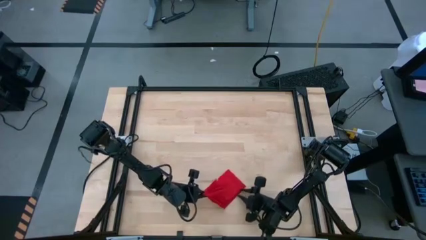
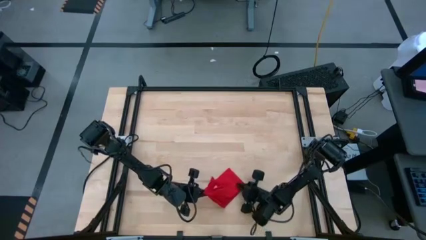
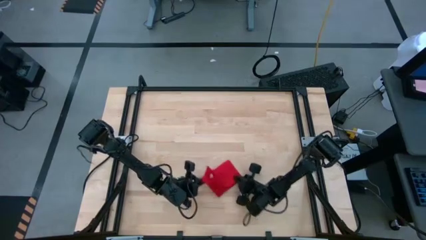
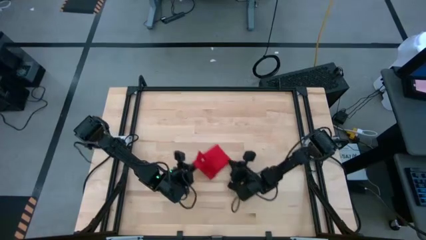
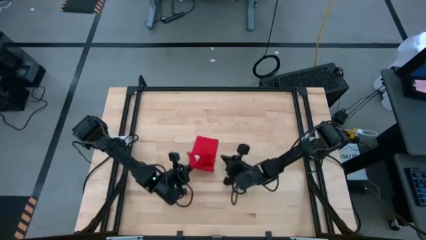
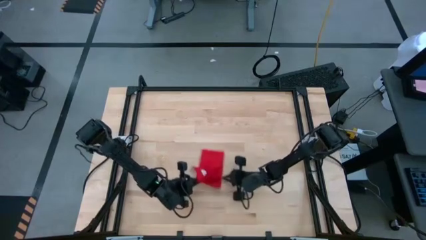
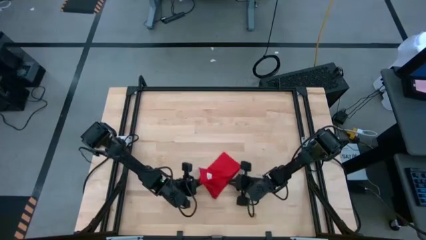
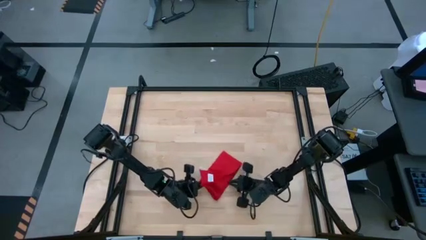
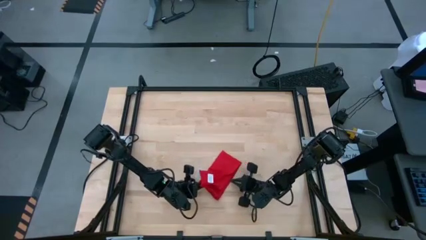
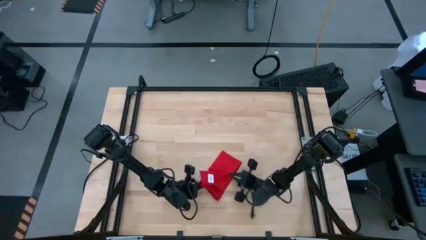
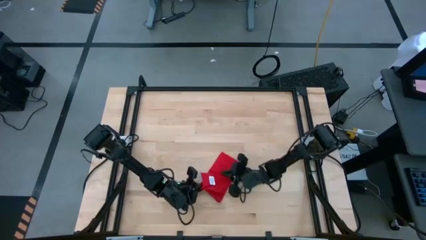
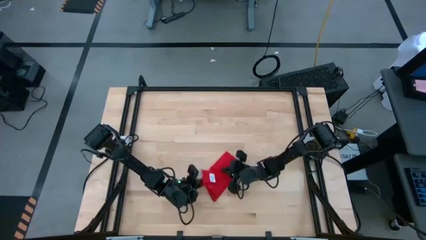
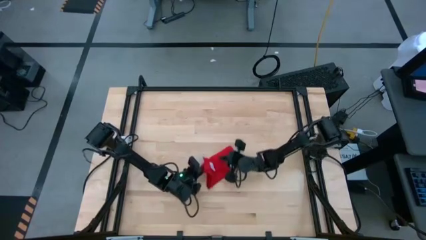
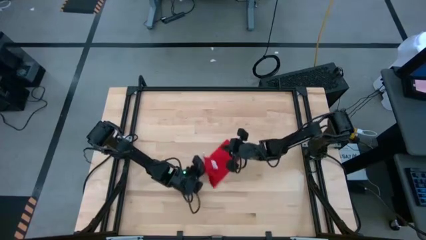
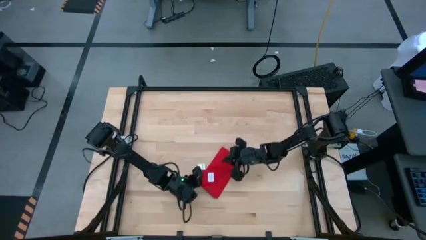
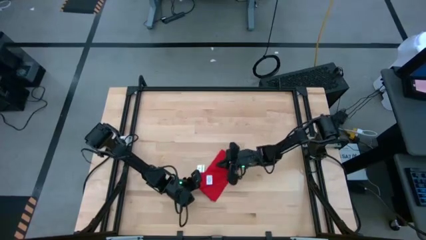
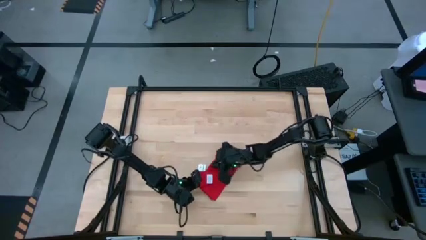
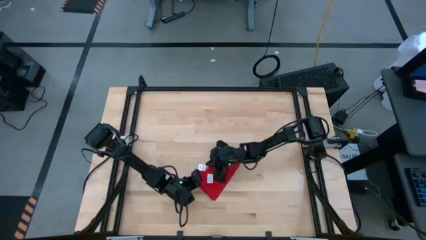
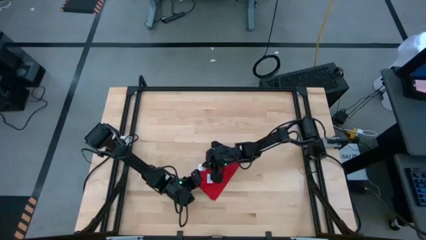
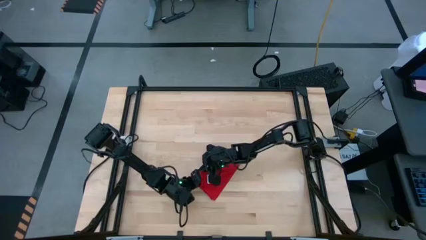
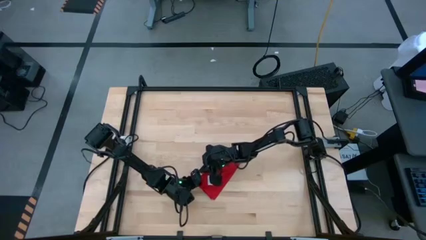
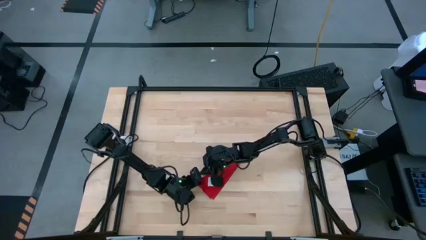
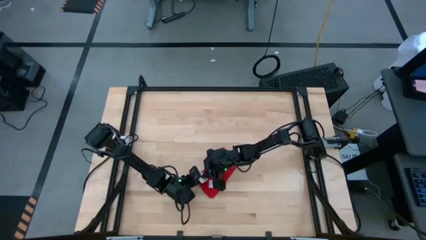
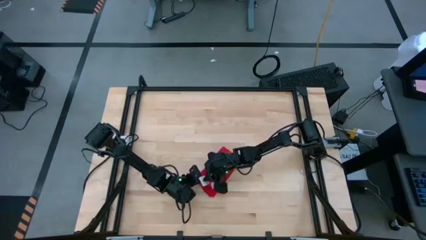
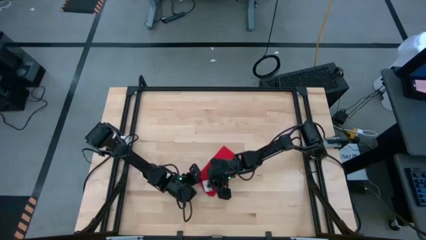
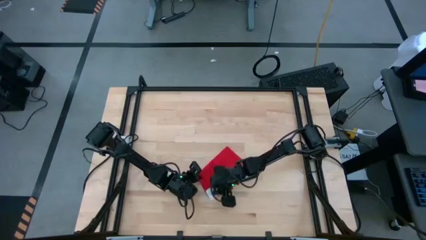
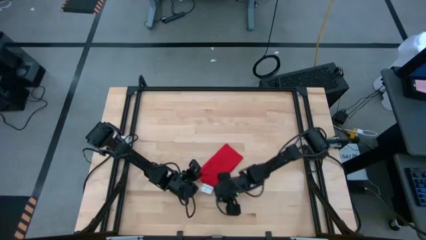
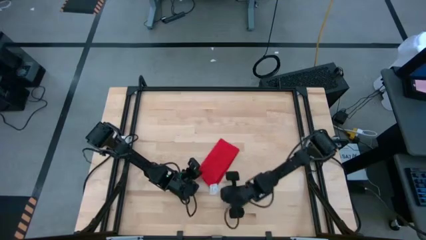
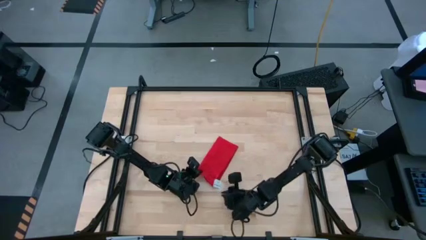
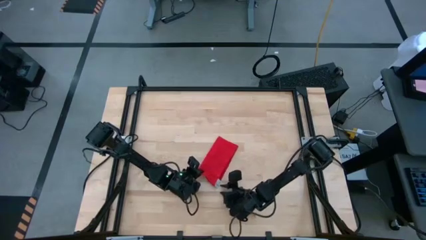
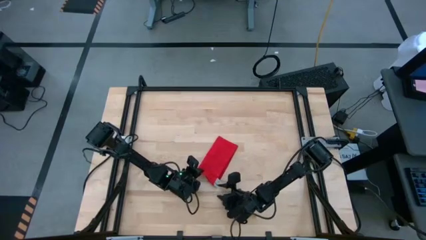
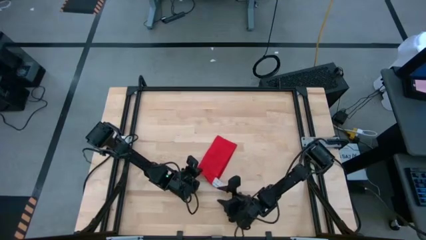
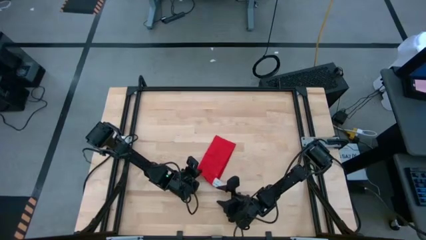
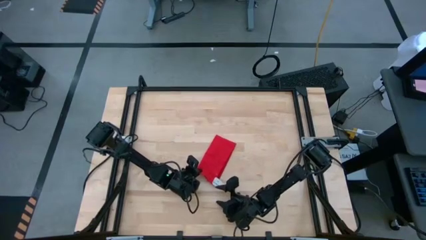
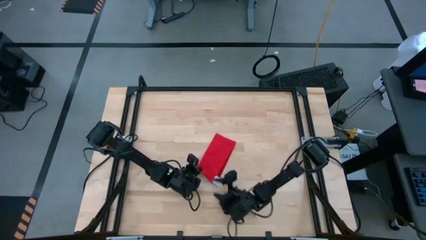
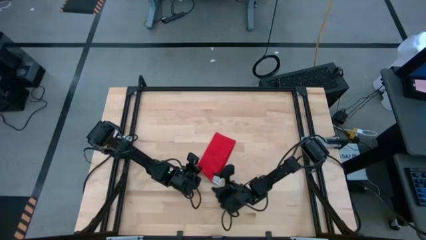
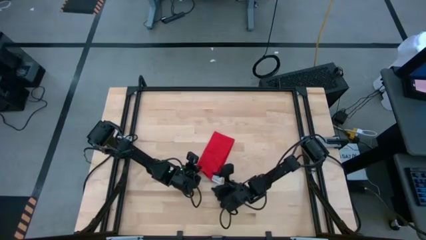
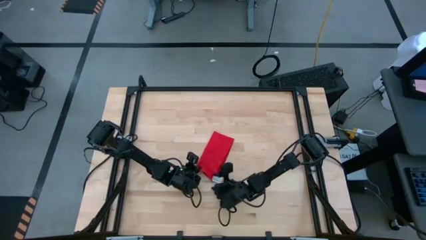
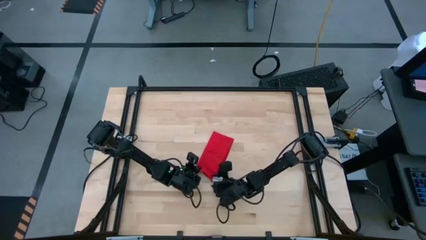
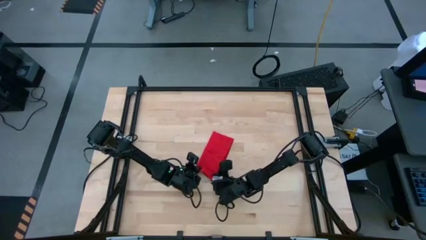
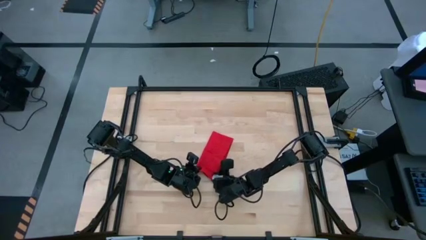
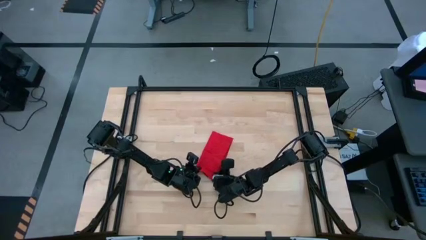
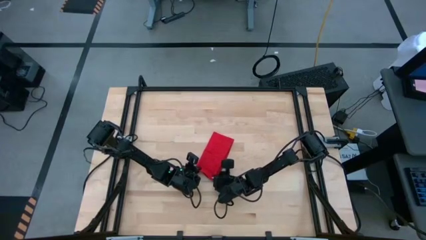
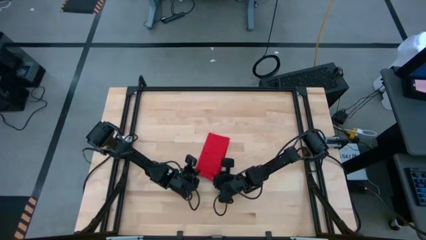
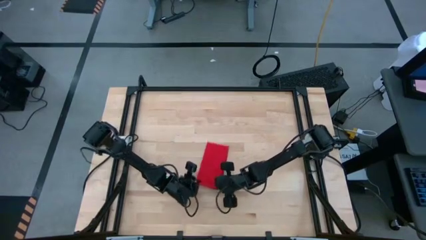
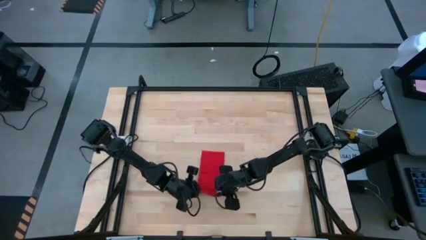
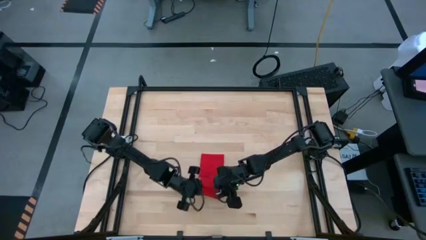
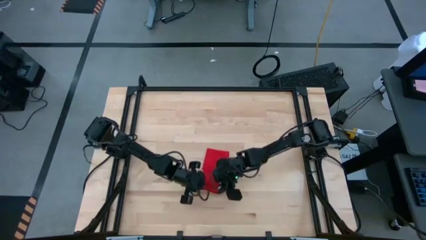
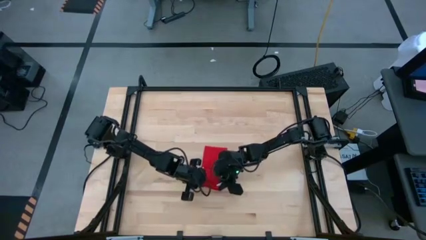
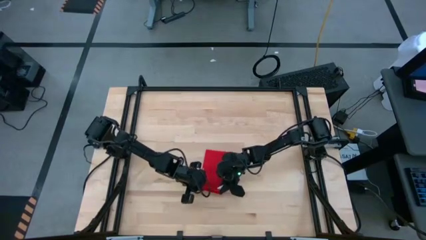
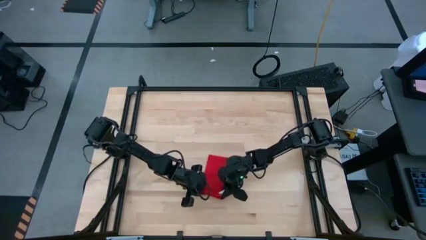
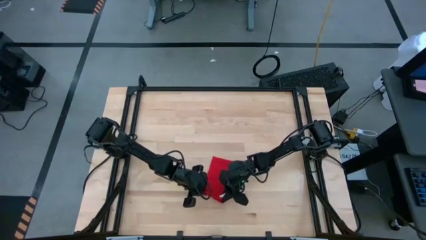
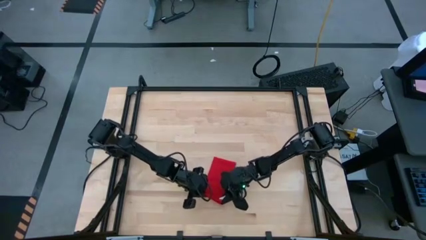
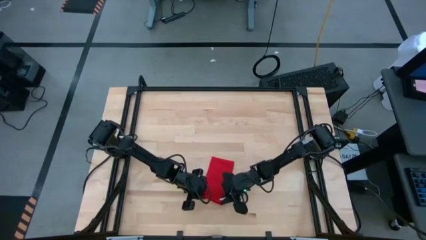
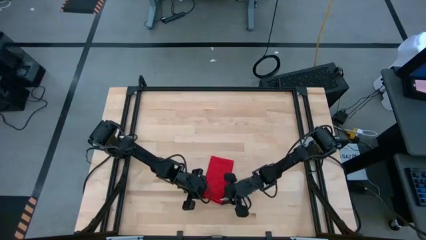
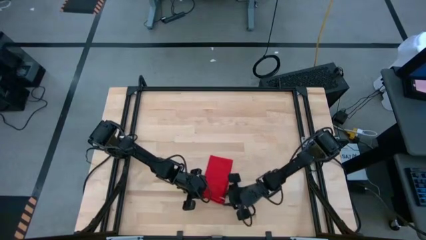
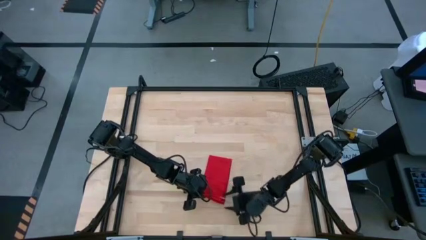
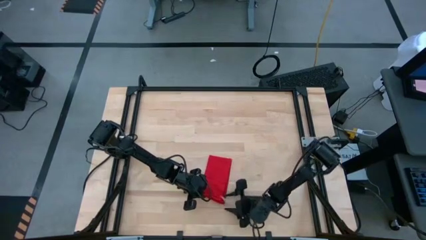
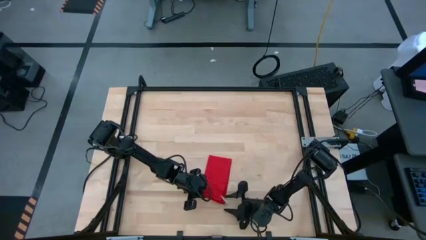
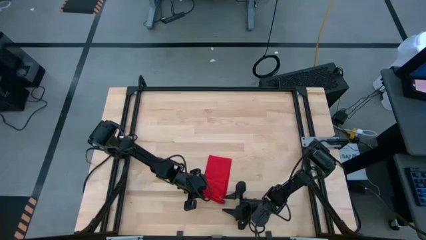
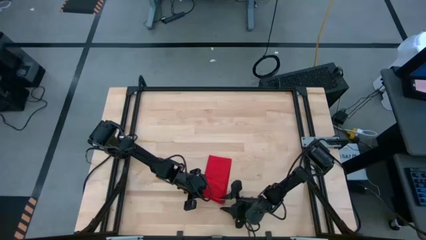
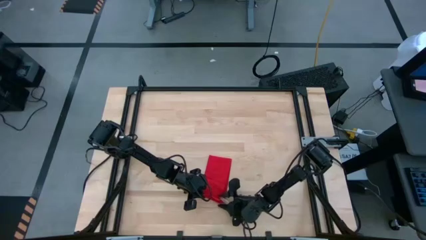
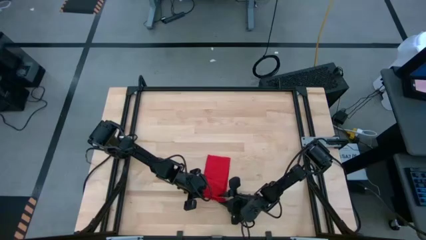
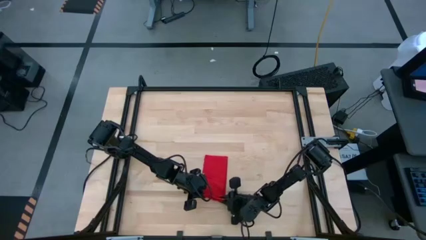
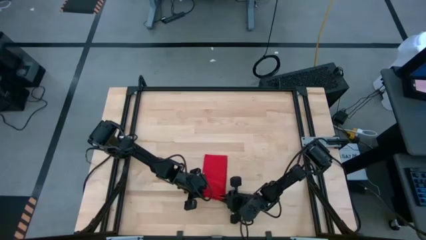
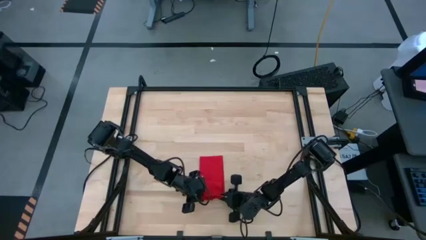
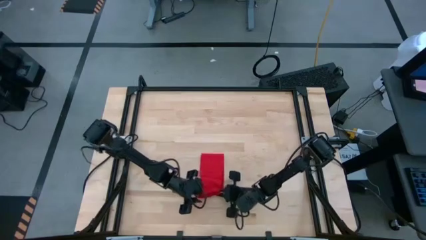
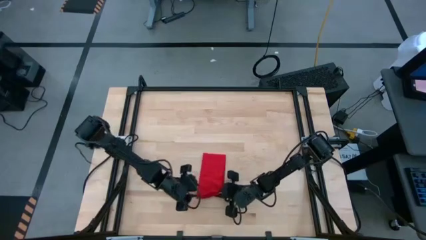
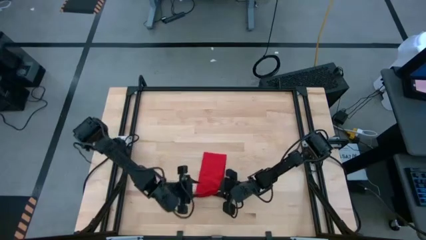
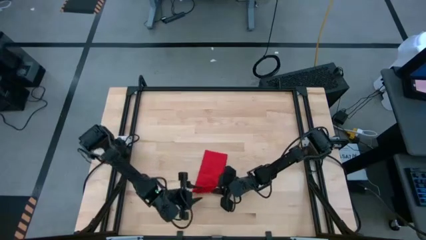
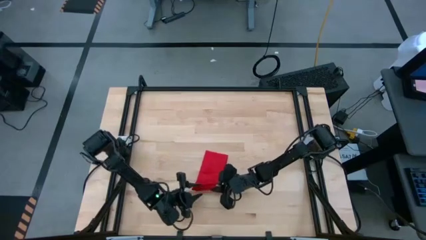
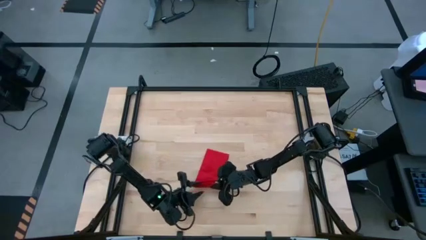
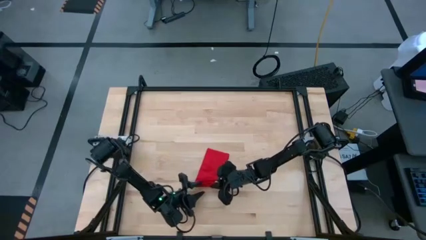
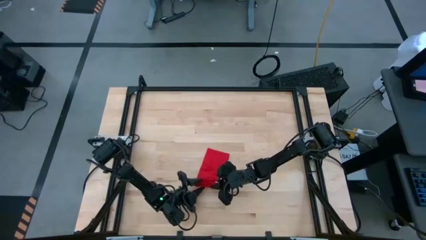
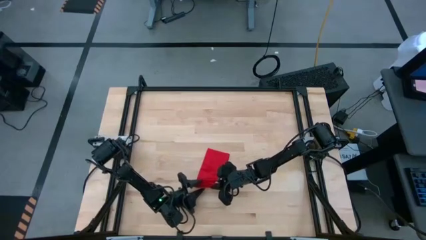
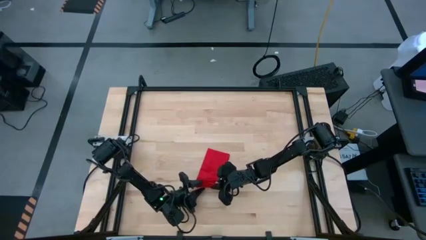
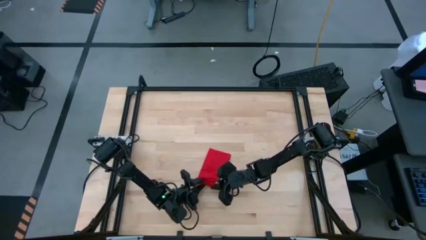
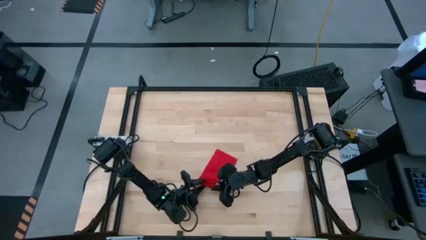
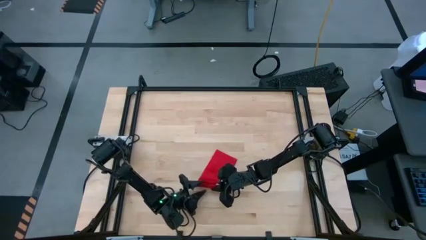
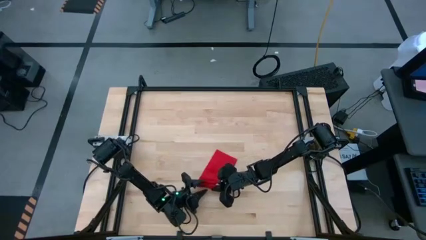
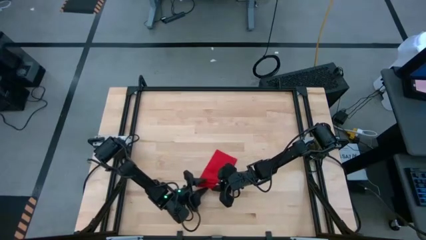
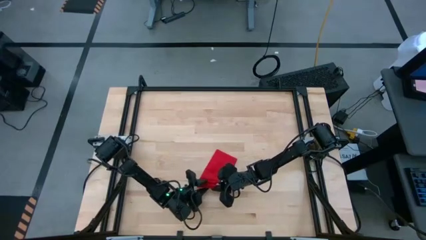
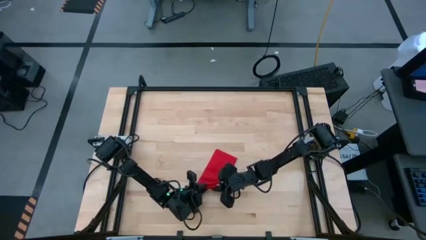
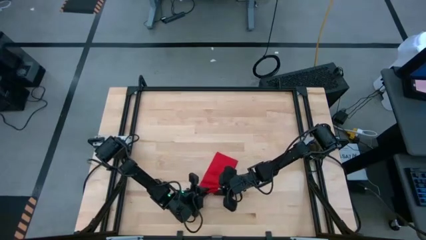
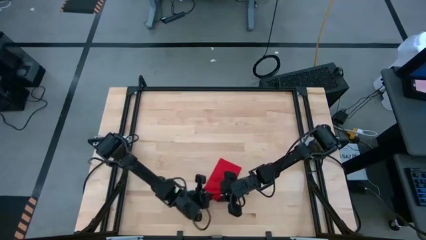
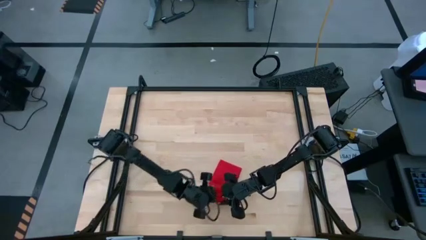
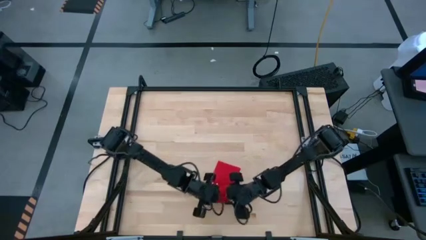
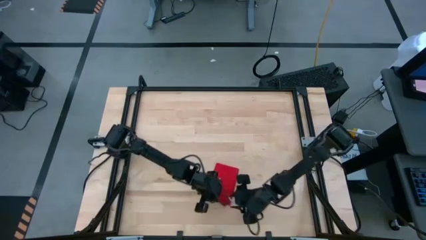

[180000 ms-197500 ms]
Task: Roll napkin
Roll the red napkin
